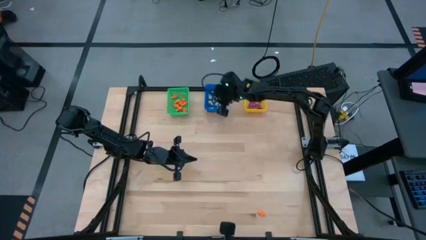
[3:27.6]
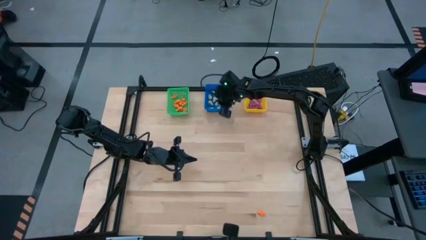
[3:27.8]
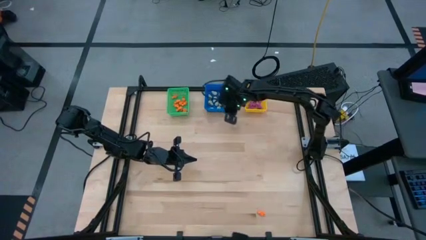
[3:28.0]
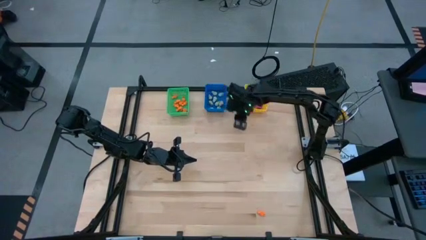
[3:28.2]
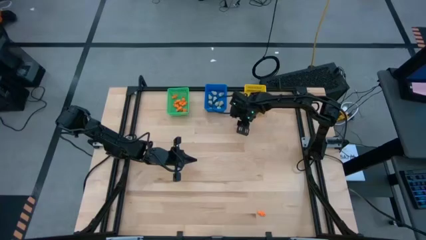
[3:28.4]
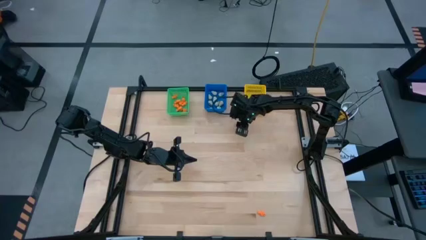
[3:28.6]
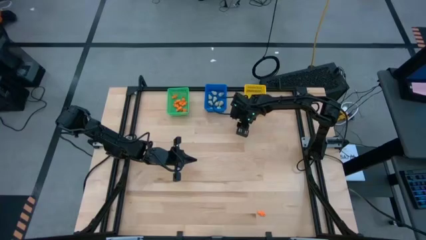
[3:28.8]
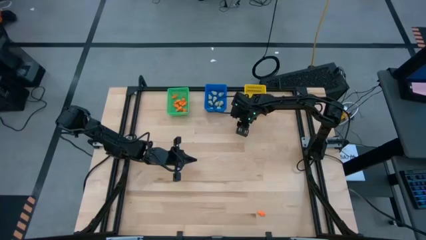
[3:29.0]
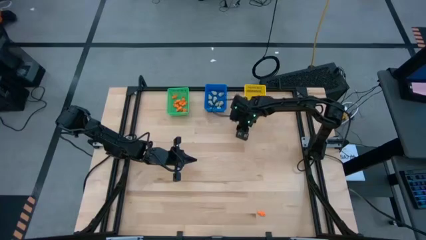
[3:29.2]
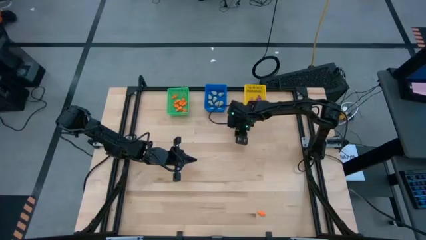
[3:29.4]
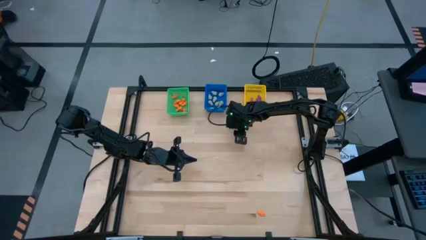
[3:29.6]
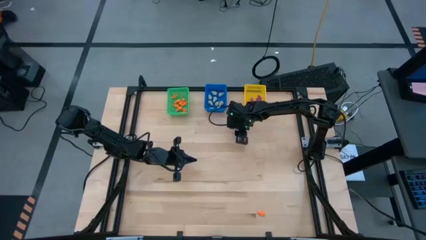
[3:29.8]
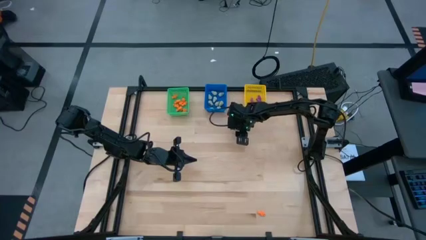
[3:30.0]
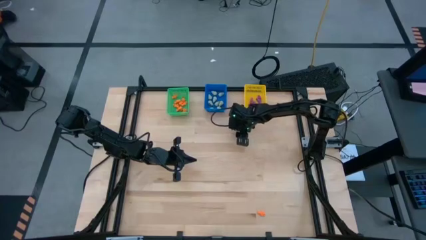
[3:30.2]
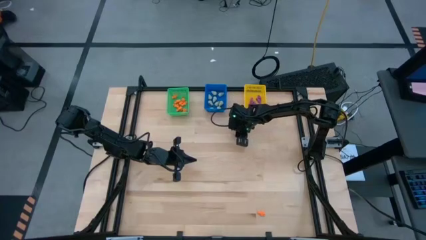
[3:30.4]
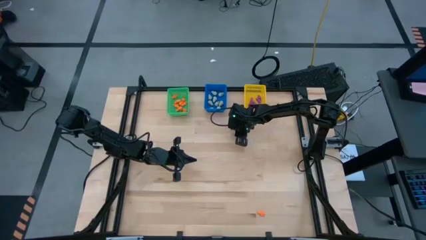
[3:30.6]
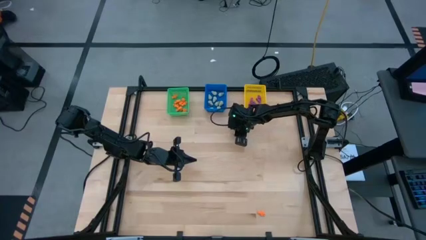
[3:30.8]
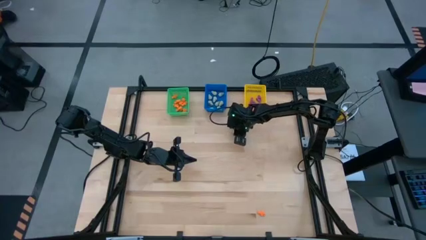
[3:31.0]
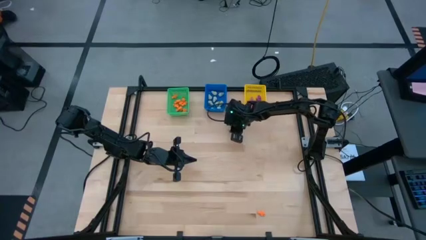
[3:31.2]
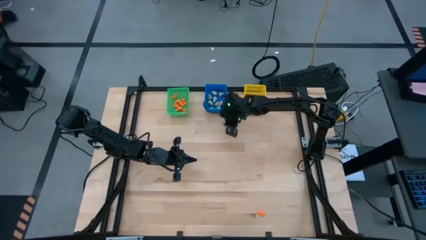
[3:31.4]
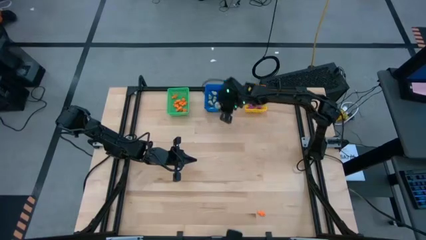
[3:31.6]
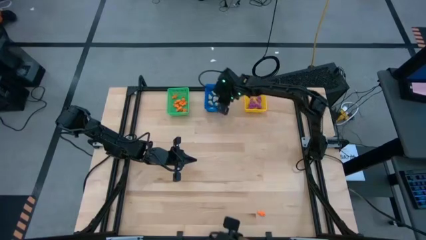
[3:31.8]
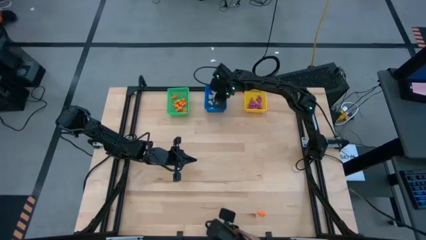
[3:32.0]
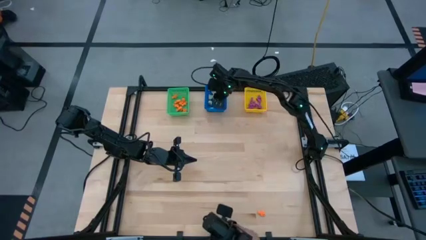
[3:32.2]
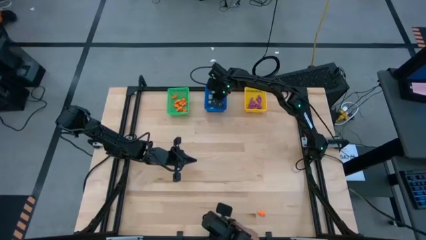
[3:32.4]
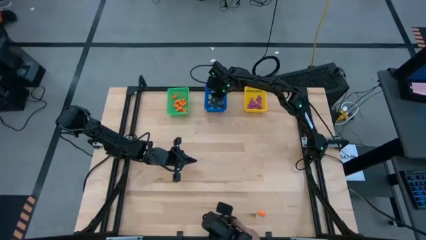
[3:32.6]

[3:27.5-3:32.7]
Task: Sort Halloween decoration
Put the white skull toy into the blue bin

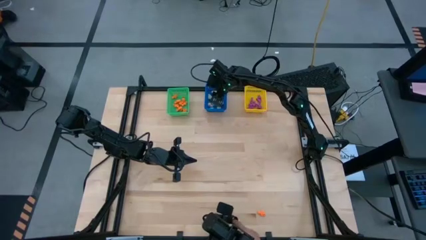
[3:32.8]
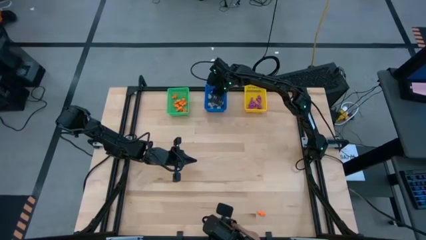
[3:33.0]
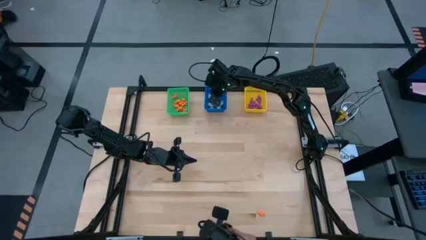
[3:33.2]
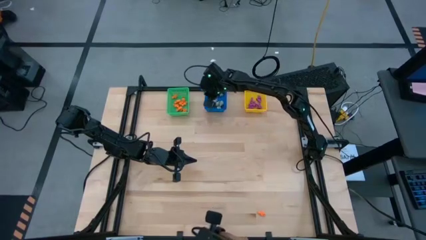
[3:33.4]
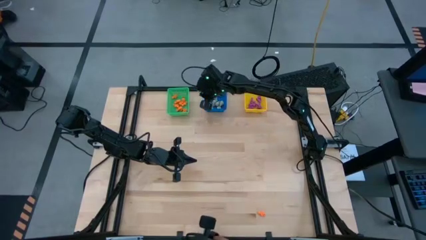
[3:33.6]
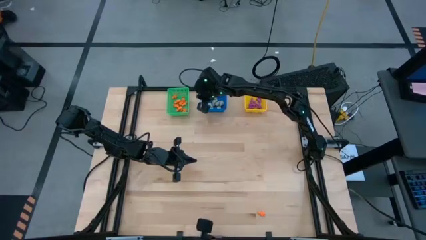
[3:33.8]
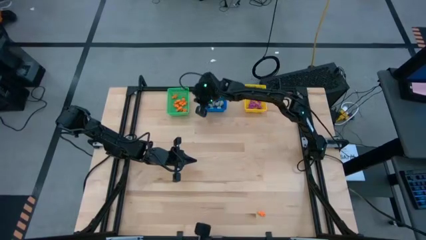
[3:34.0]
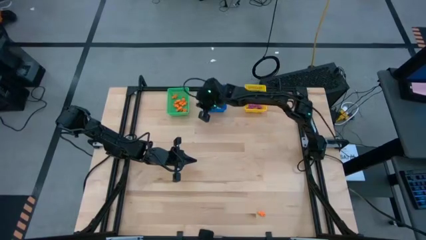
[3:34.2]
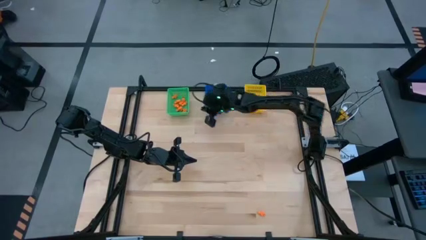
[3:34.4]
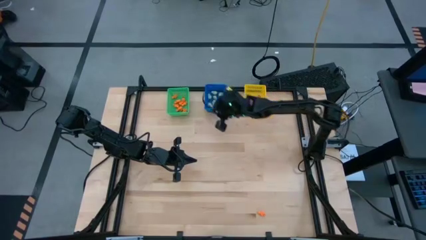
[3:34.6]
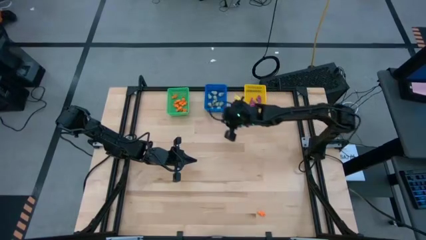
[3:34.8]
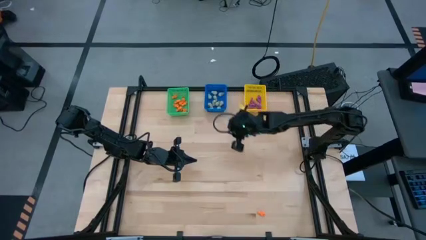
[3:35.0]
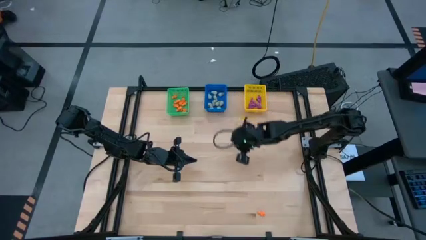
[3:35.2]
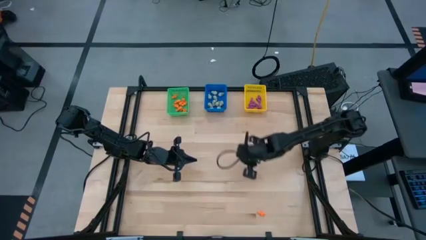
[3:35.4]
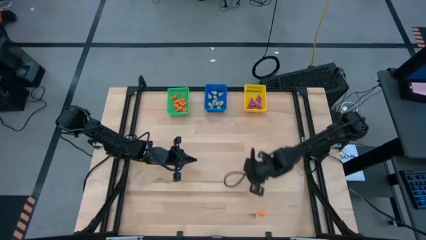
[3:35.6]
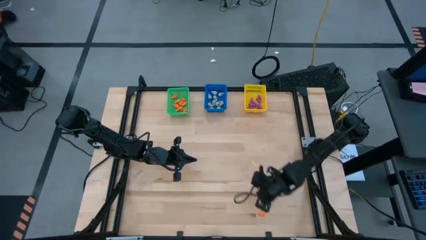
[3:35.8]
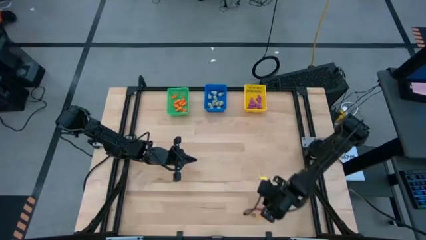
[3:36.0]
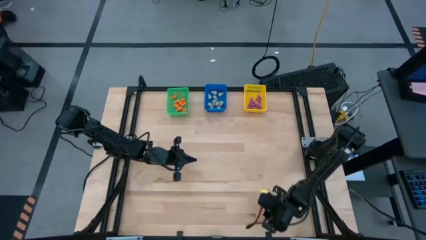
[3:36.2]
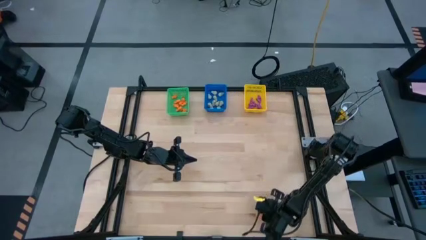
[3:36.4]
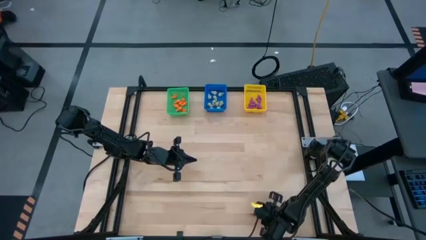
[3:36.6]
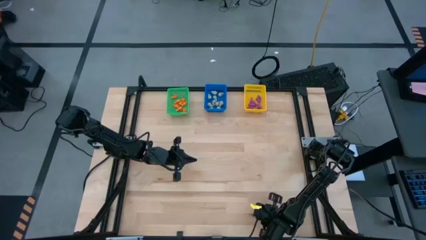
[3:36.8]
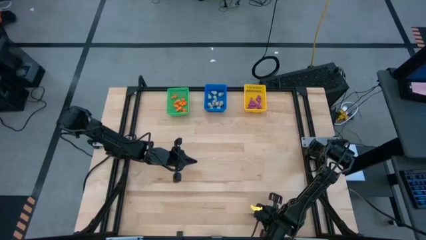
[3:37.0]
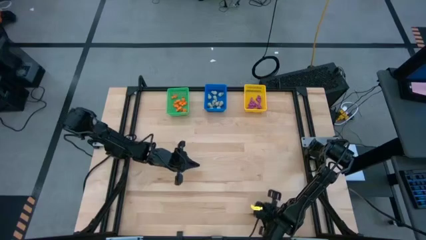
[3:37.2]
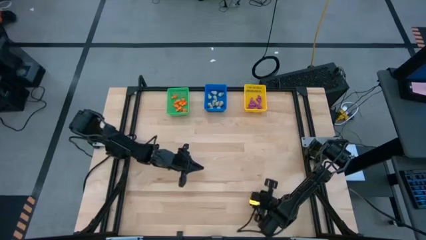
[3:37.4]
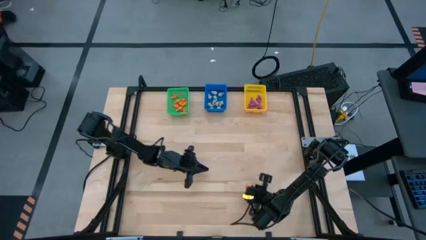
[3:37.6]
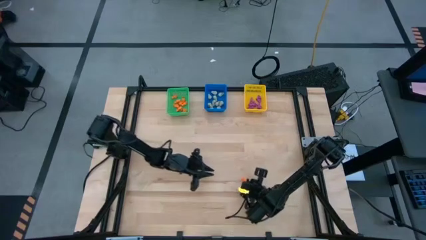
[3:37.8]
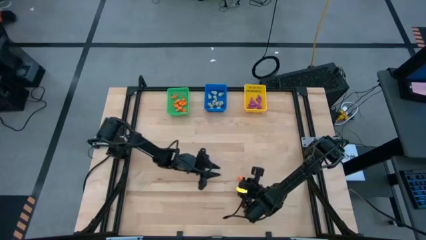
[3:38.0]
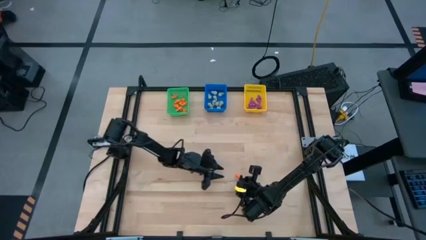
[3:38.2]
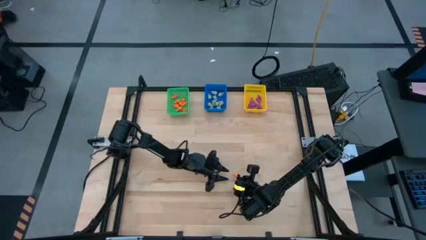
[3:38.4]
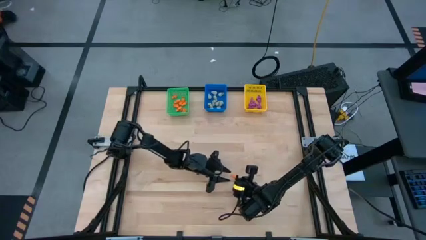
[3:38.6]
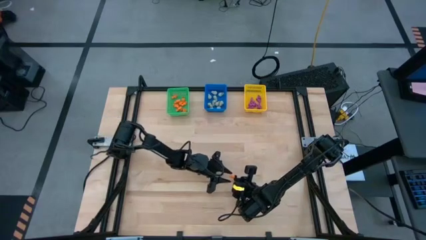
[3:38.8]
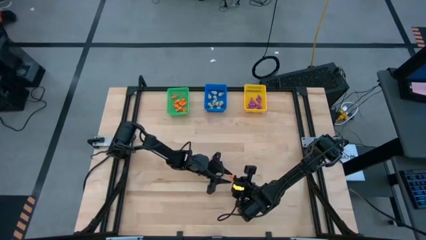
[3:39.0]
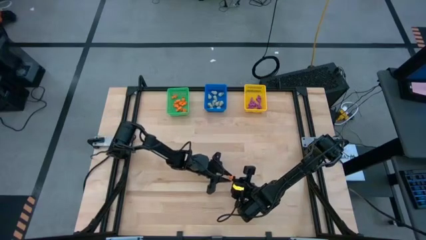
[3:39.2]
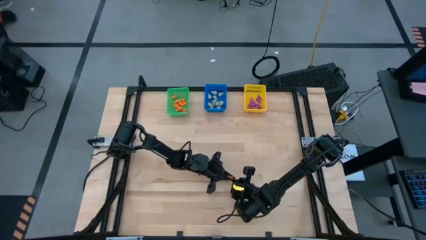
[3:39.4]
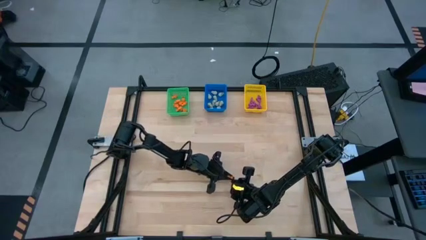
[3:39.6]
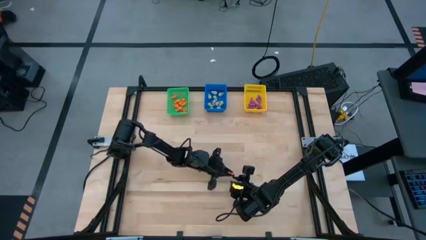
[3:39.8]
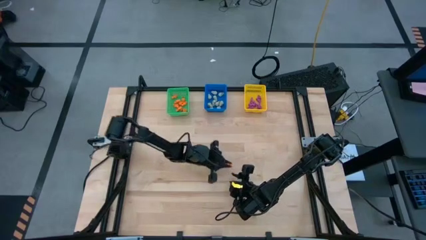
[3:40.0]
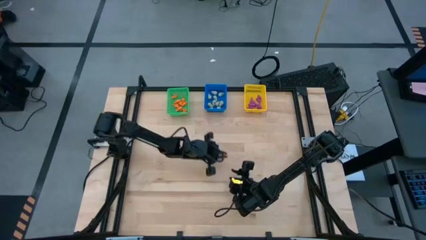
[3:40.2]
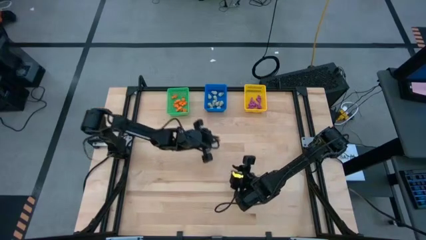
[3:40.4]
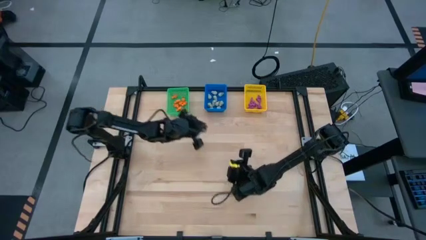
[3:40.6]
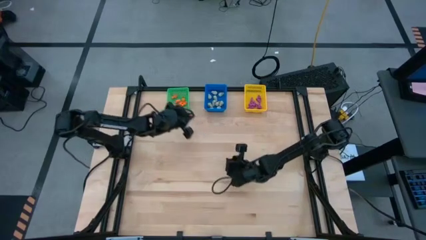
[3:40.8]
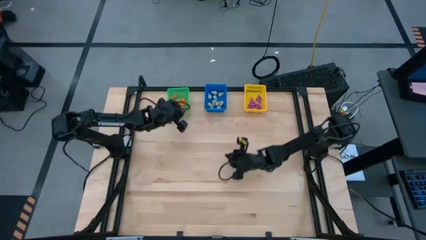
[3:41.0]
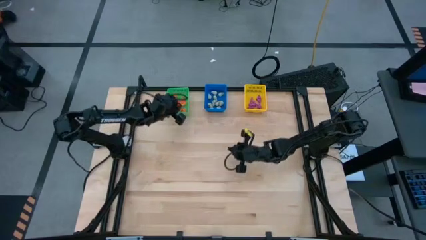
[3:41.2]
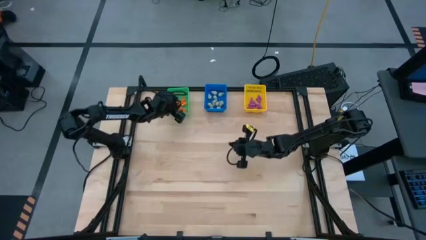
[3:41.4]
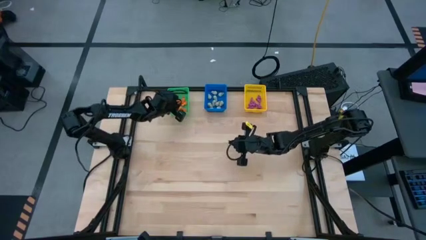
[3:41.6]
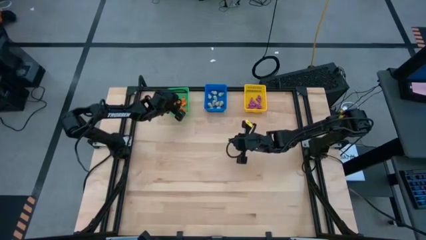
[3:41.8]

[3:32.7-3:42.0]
Put the orange skeleton toy into the green bin

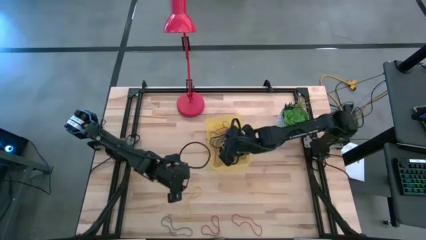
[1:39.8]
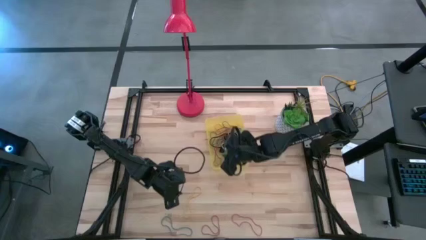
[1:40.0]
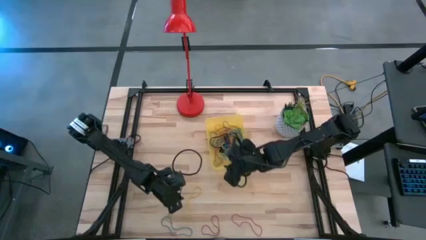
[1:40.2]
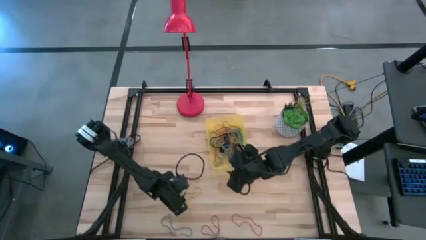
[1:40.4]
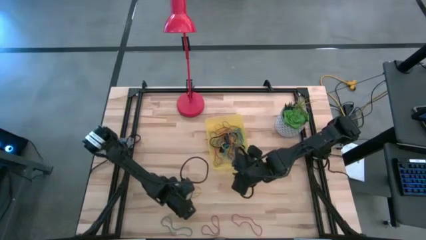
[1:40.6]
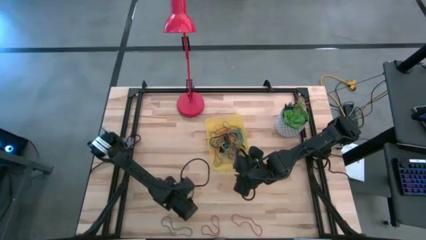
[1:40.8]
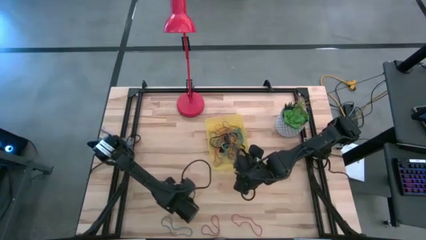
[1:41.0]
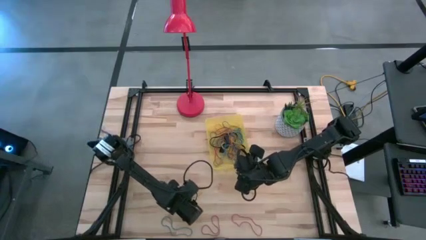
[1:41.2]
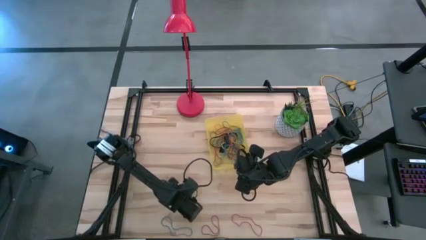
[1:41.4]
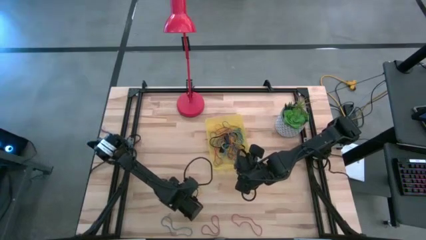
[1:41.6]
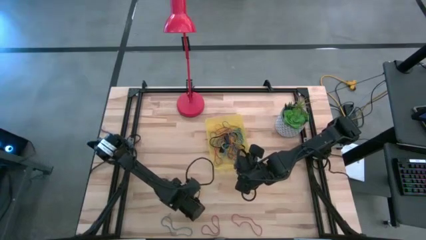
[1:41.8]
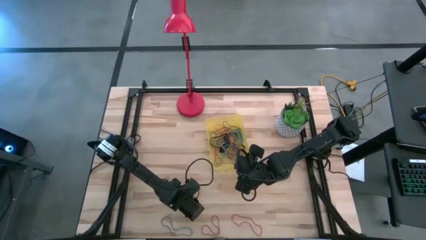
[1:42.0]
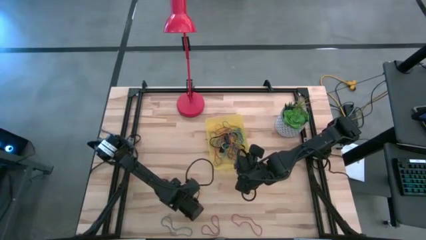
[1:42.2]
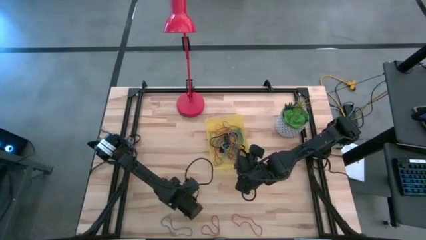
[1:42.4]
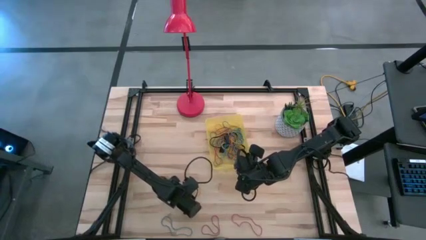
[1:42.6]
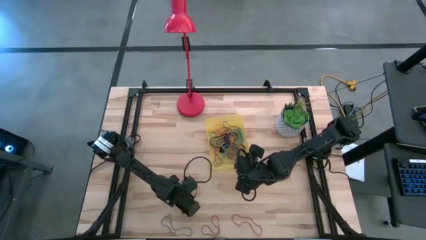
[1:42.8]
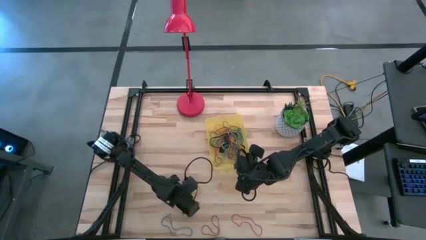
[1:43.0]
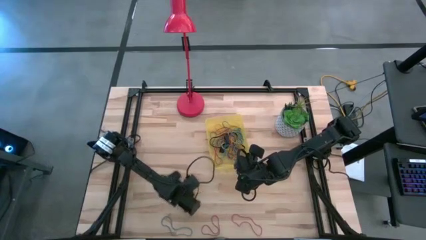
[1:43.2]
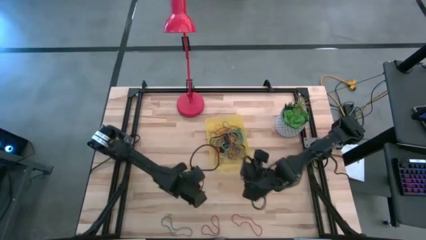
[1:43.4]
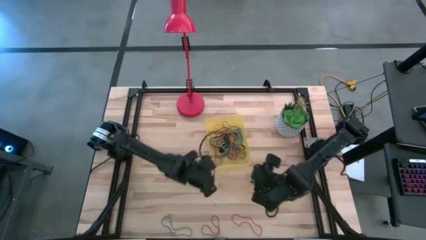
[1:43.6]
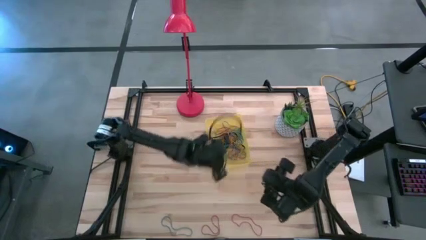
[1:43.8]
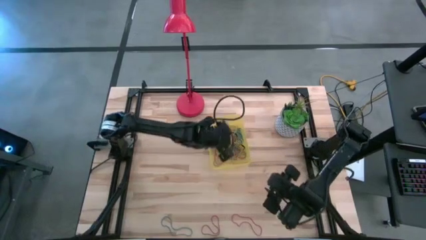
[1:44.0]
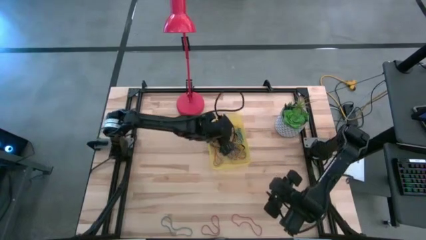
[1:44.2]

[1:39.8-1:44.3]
Task: Pick and place rubber bands into bin
Put the yellow rubber band into yellow bin
